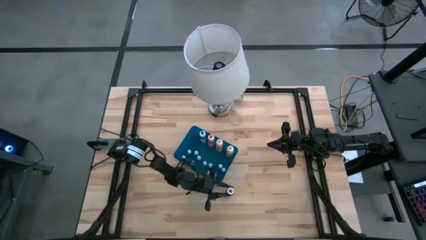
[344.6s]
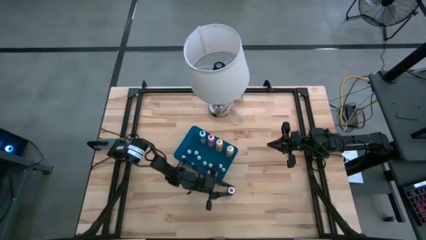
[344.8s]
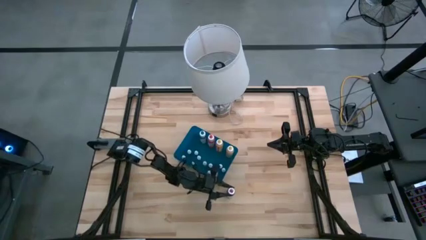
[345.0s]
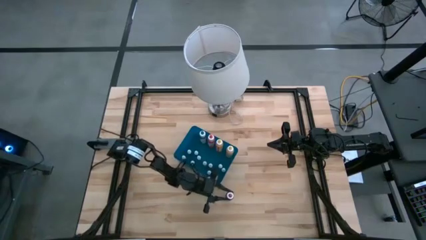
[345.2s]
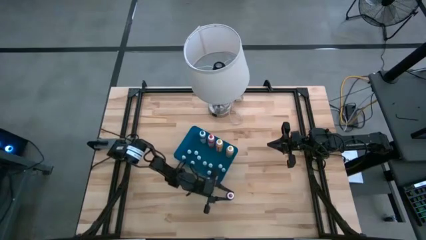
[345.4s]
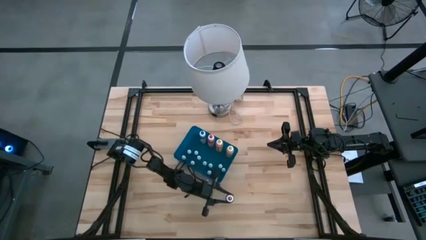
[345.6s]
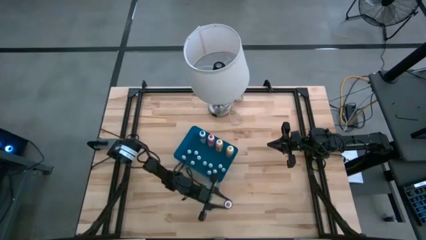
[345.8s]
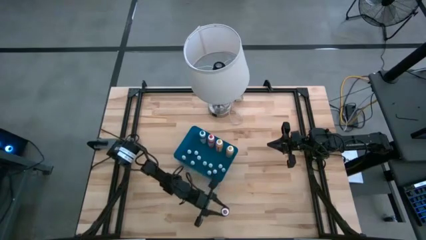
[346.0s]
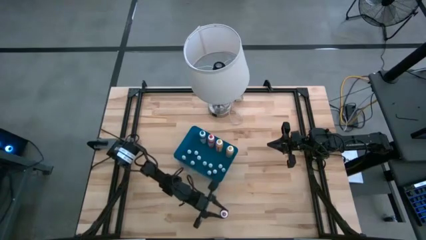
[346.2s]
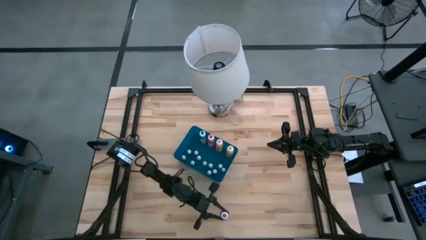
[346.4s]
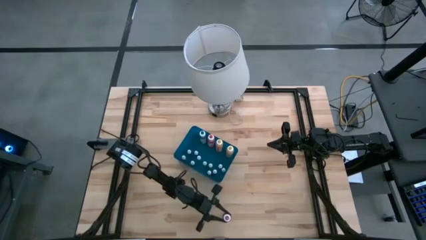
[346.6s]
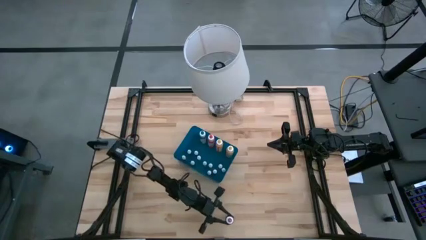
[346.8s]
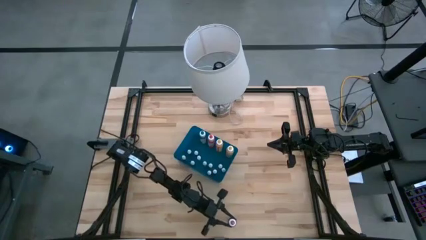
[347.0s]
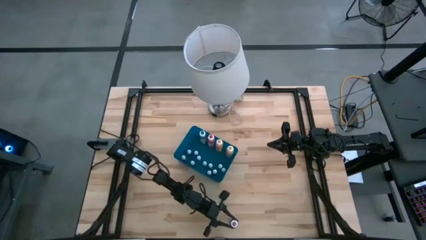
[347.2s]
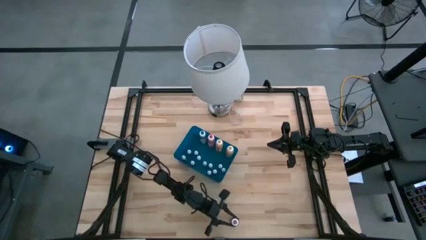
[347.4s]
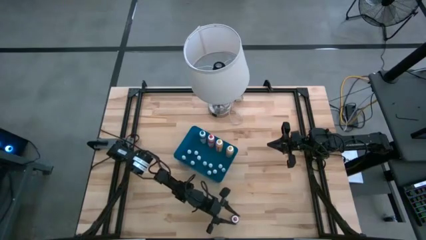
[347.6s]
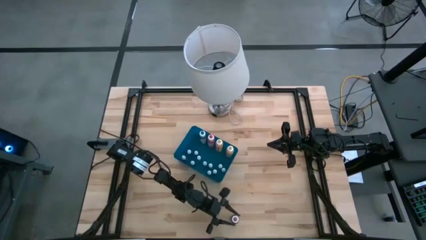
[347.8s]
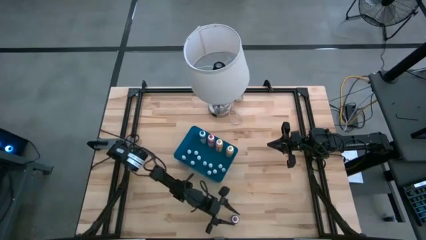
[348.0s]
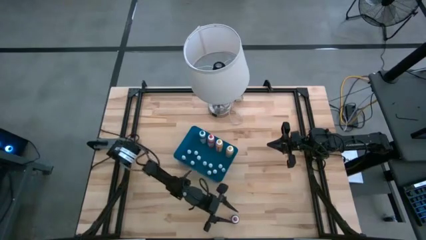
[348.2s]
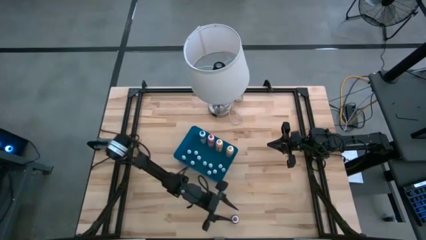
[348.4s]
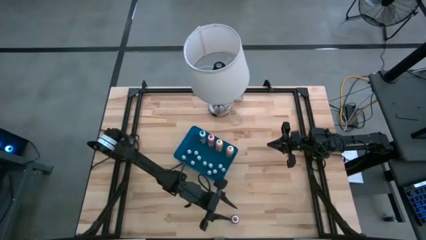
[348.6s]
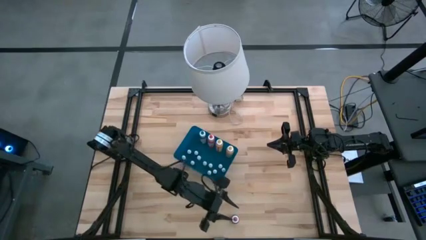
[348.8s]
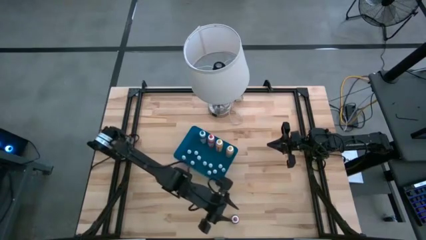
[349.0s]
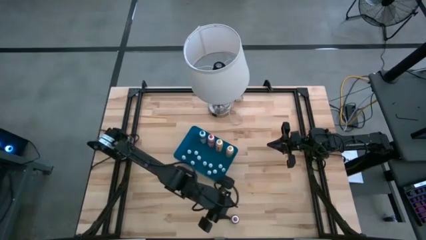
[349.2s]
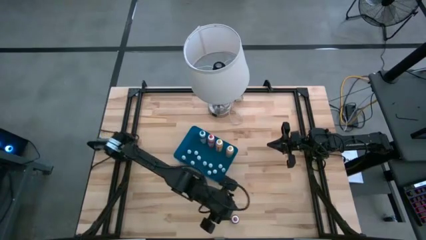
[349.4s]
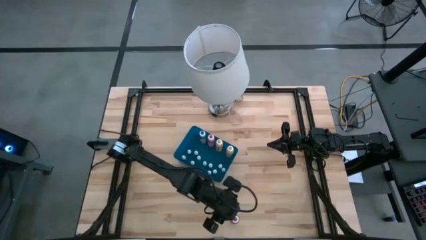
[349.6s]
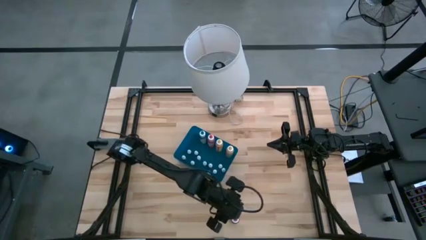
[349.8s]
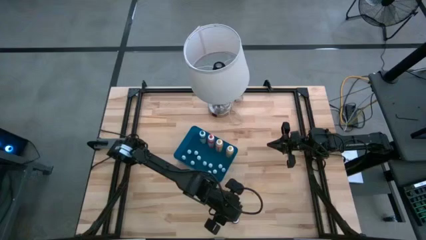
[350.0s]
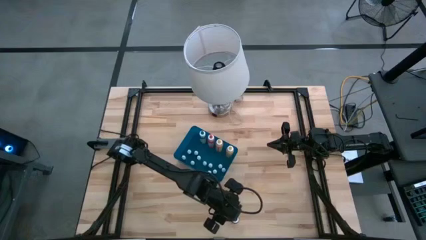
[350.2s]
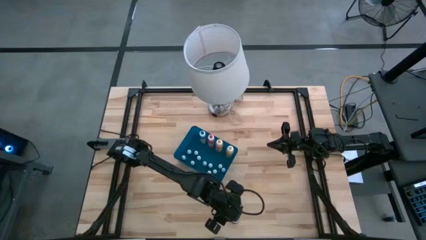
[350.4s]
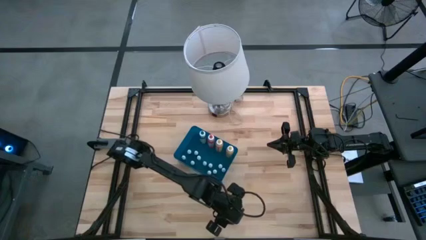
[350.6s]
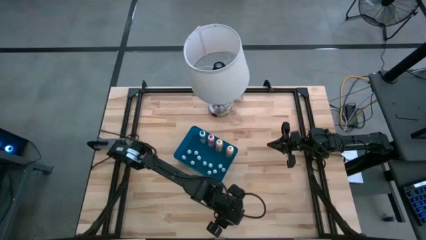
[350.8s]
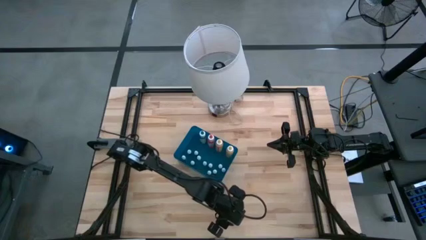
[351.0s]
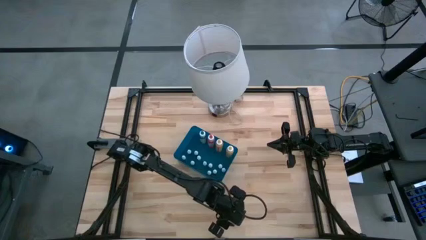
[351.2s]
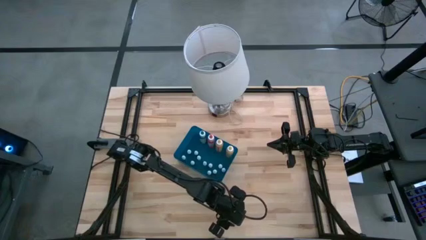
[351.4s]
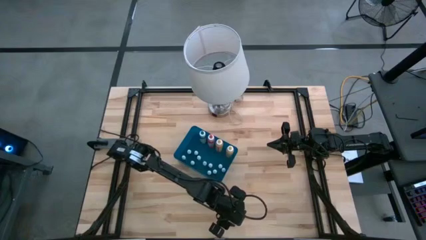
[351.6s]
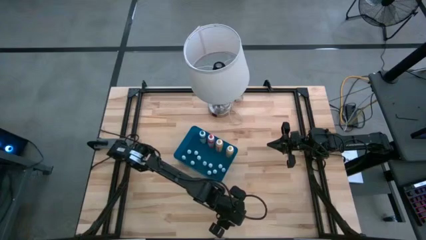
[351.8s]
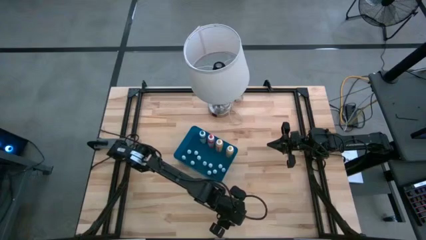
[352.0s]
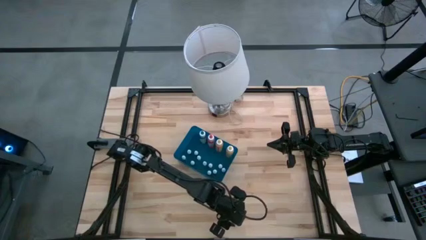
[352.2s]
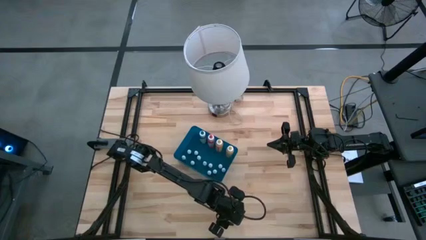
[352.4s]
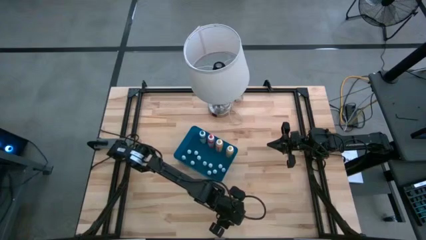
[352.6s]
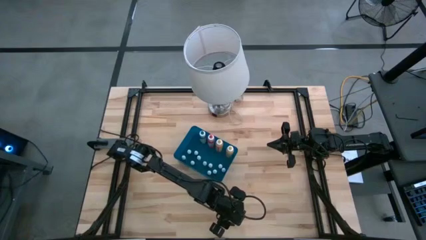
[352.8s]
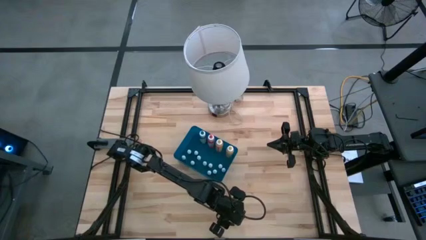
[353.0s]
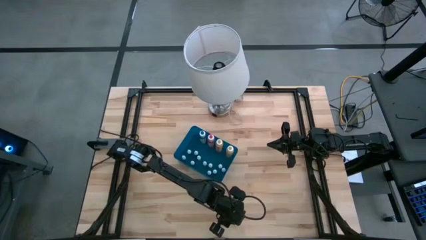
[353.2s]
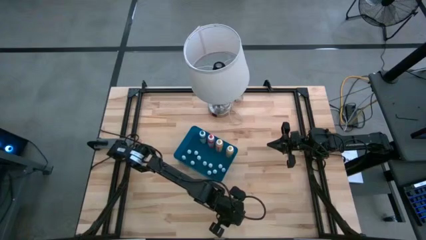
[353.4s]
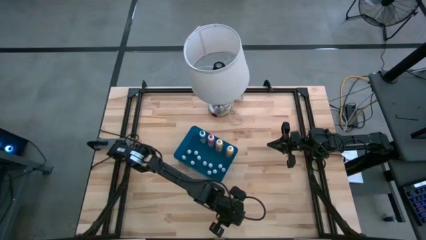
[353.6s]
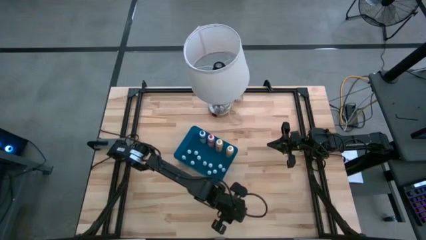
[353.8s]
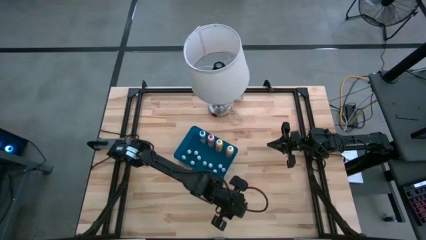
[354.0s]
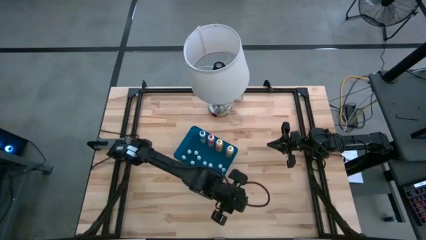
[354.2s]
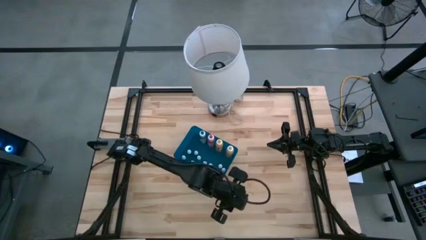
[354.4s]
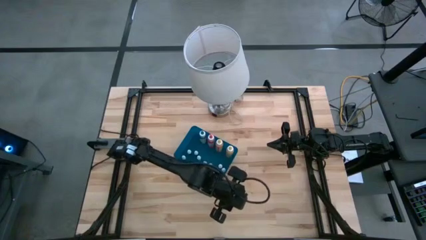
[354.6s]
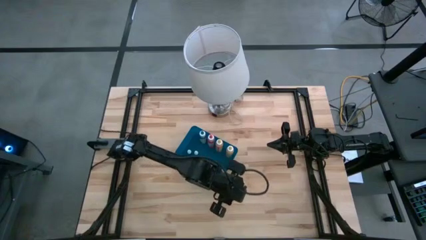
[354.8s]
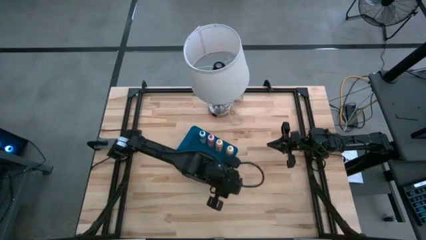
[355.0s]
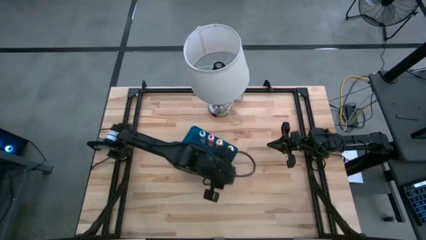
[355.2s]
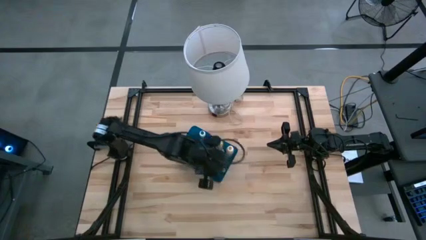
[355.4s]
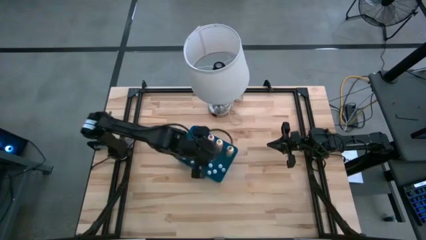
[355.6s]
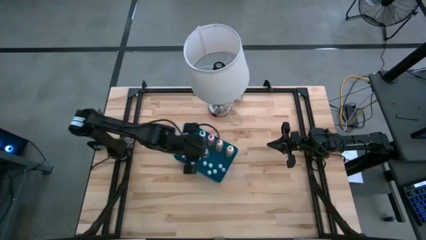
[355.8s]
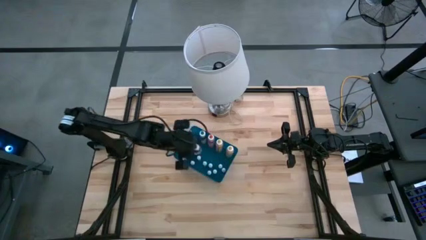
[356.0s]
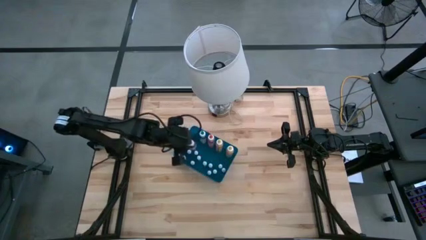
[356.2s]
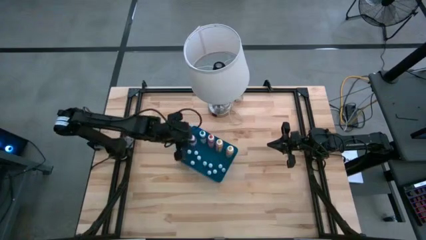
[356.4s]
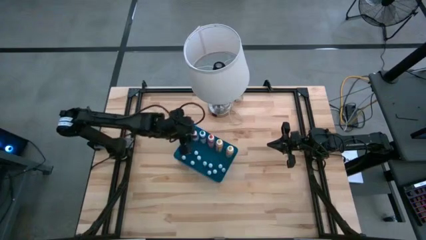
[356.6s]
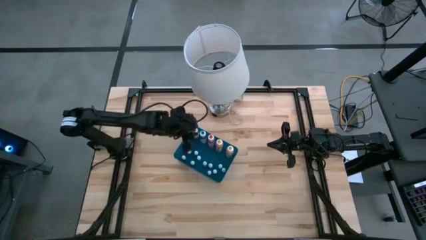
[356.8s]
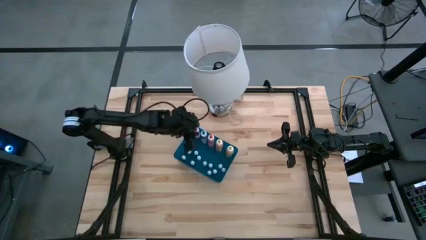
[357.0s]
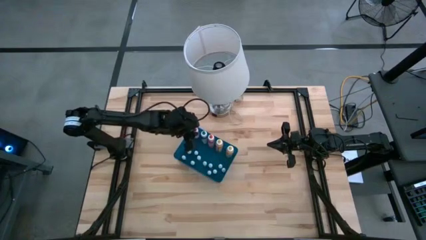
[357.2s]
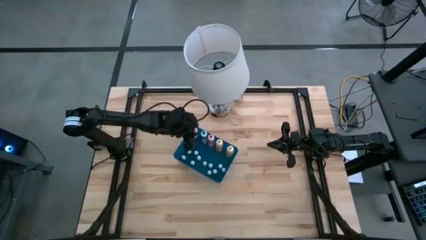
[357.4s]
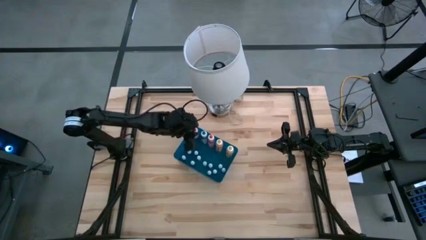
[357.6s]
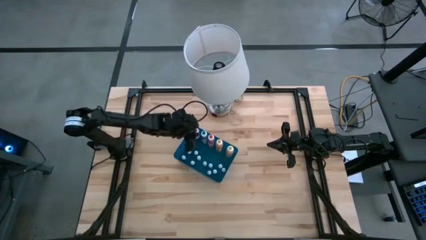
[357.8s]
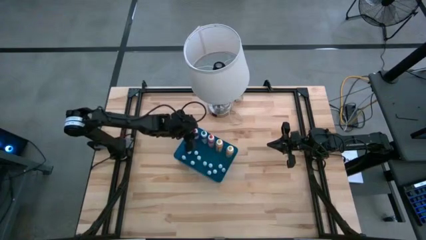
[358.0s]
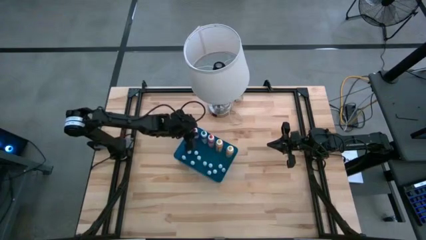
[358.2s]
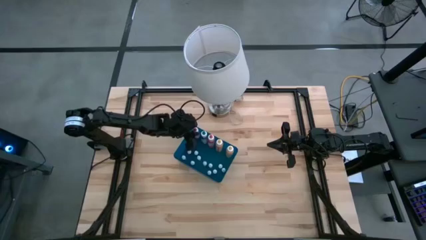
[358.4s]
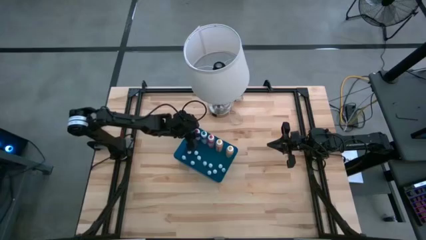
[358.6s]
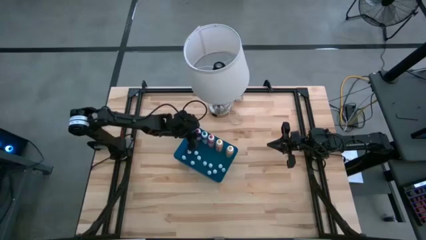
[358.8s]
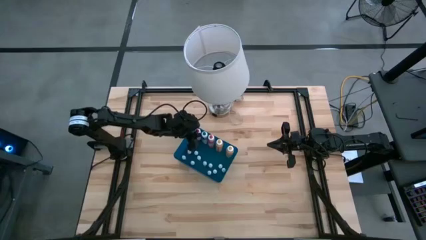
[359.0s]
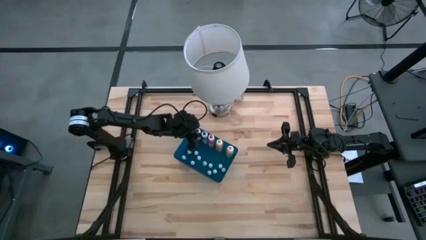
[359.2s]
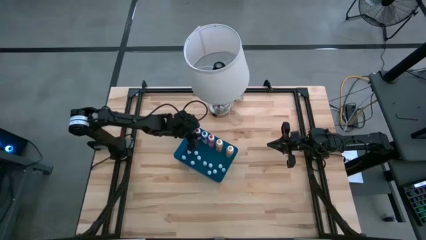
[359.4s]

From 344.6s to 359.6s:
Task: Pick & Place food coloring
Put the large red food coloring bottle into the blue container
